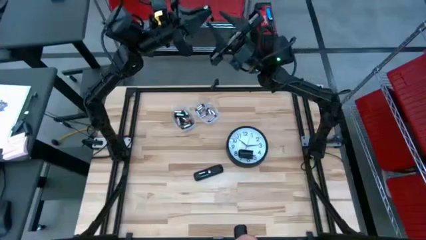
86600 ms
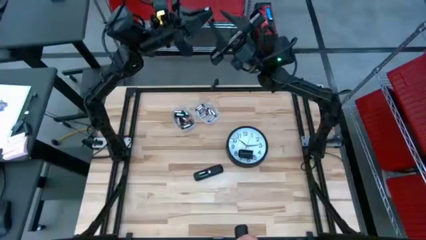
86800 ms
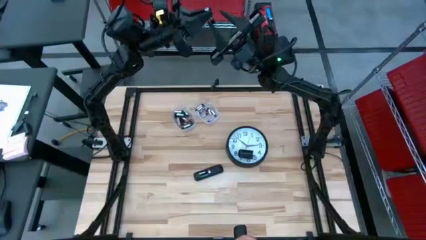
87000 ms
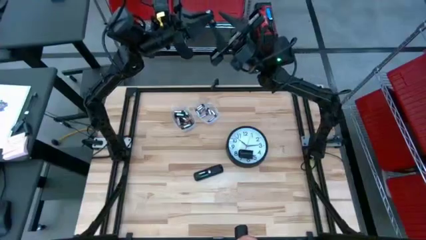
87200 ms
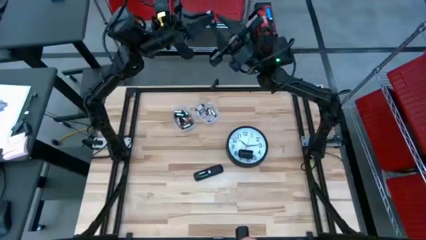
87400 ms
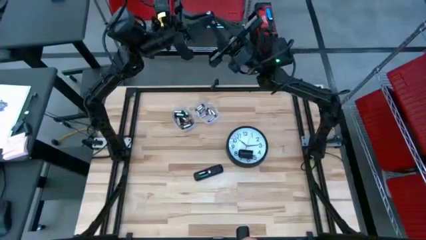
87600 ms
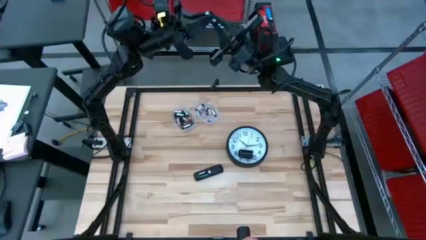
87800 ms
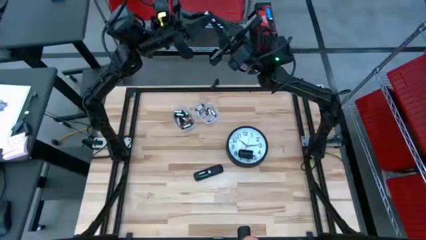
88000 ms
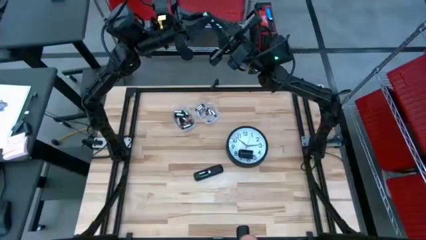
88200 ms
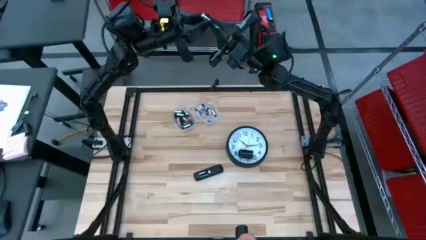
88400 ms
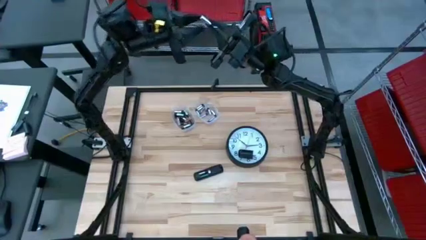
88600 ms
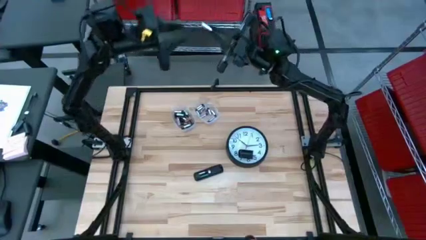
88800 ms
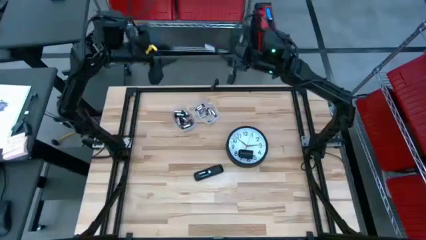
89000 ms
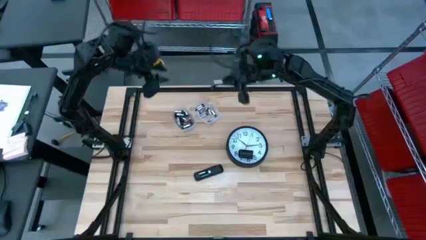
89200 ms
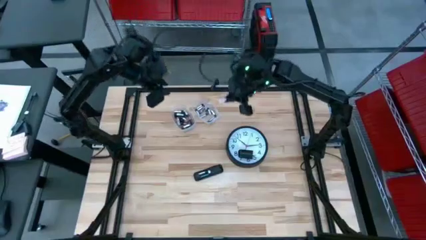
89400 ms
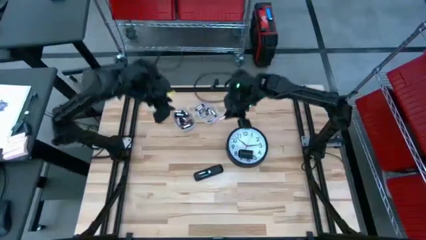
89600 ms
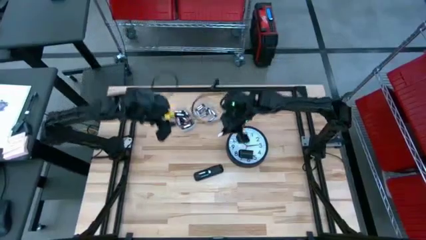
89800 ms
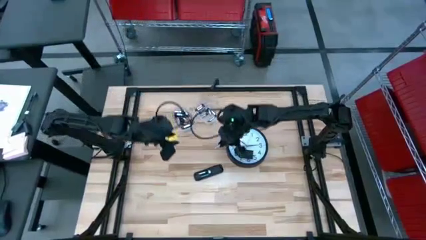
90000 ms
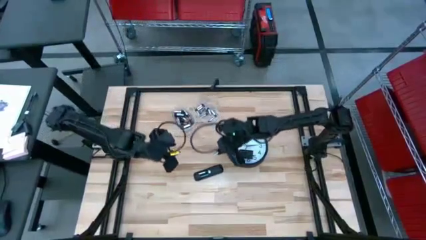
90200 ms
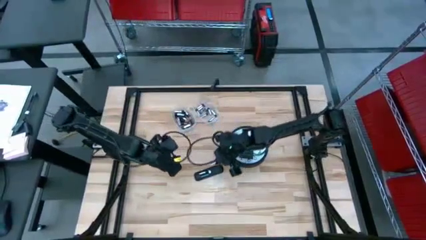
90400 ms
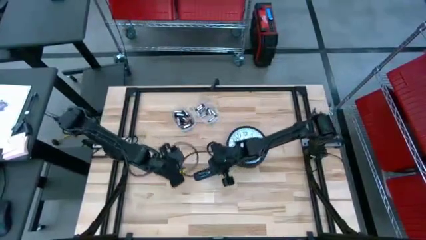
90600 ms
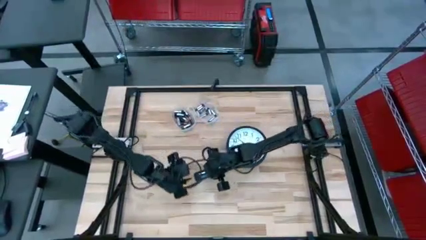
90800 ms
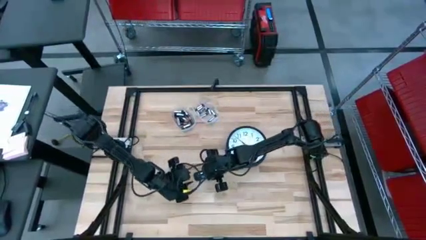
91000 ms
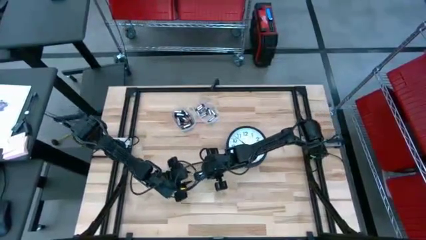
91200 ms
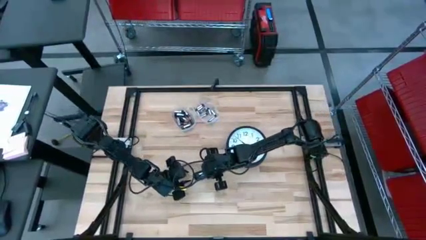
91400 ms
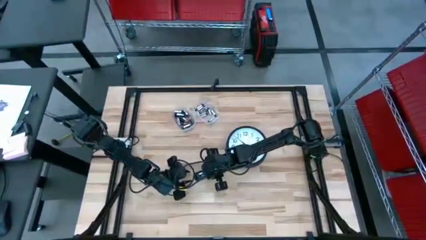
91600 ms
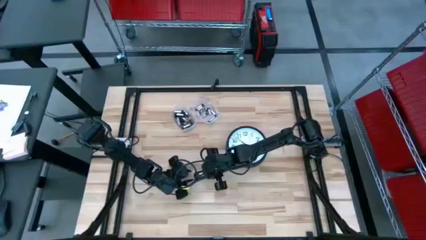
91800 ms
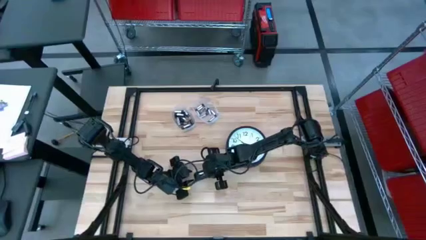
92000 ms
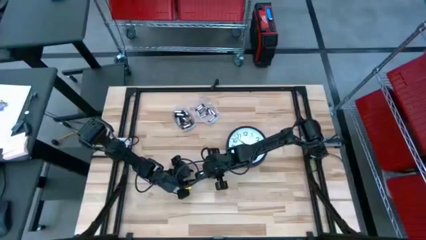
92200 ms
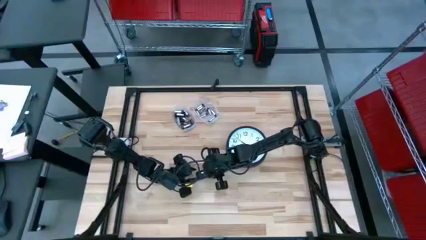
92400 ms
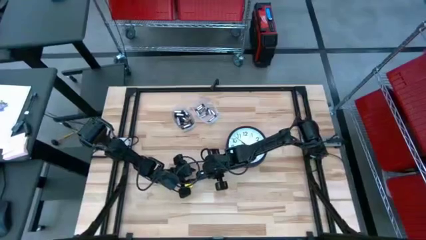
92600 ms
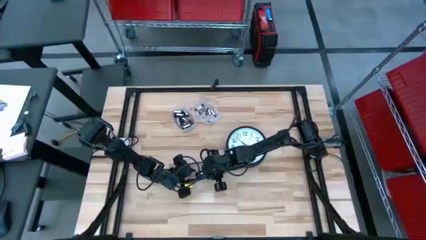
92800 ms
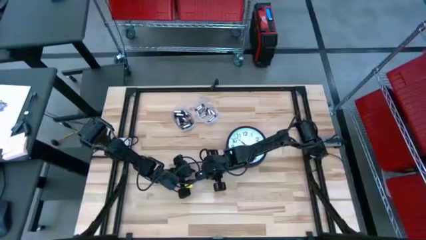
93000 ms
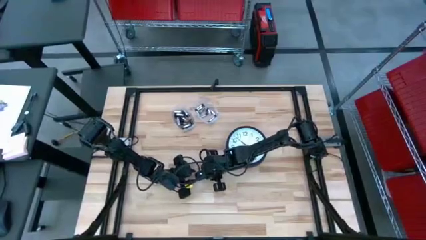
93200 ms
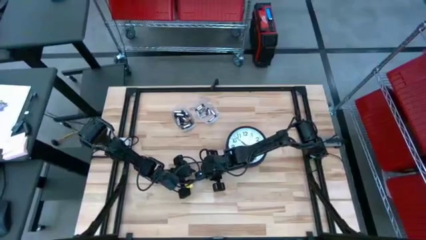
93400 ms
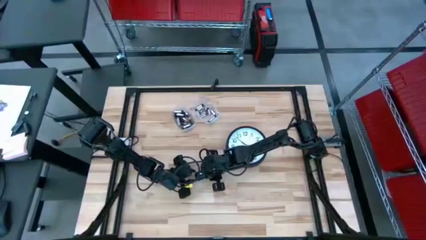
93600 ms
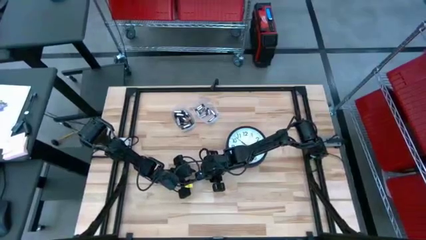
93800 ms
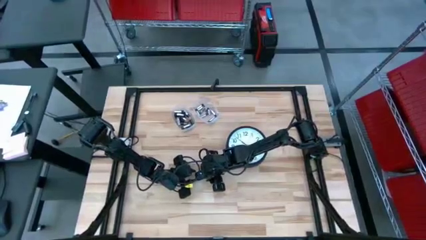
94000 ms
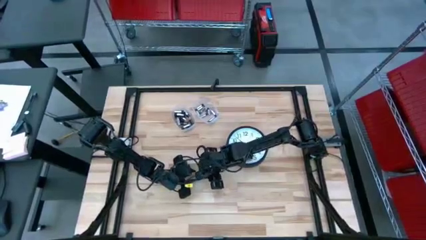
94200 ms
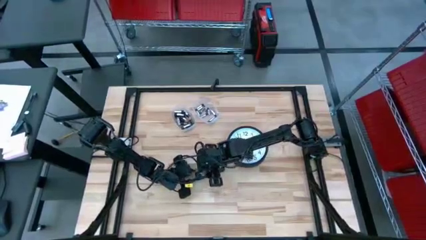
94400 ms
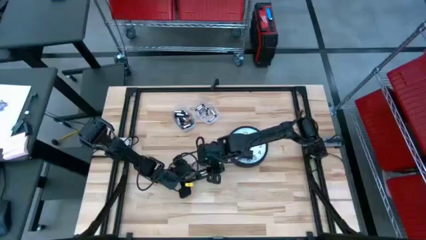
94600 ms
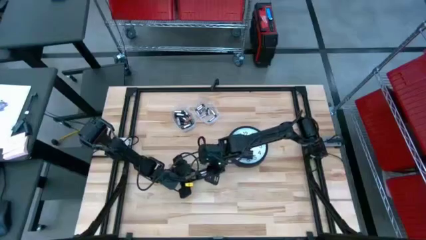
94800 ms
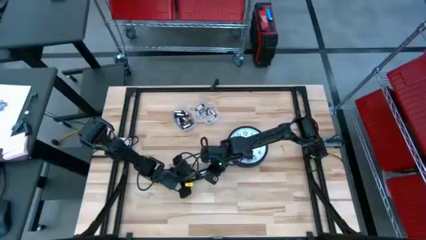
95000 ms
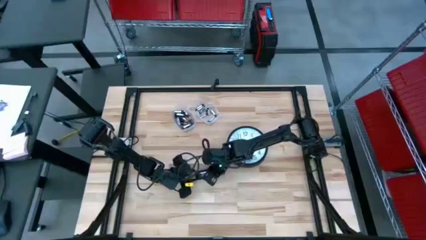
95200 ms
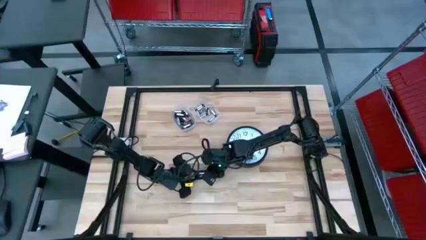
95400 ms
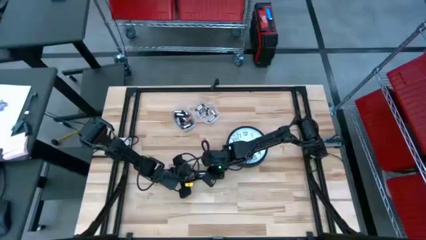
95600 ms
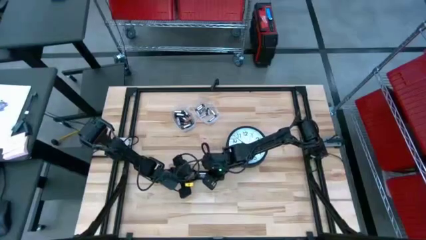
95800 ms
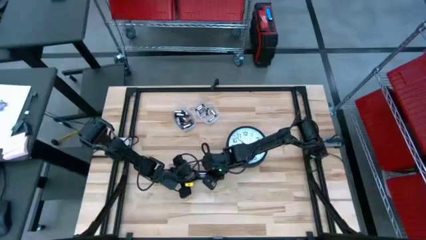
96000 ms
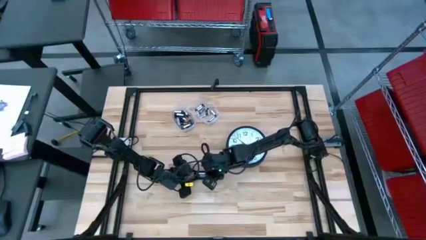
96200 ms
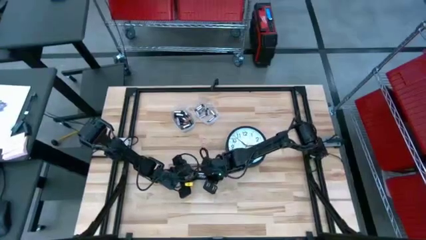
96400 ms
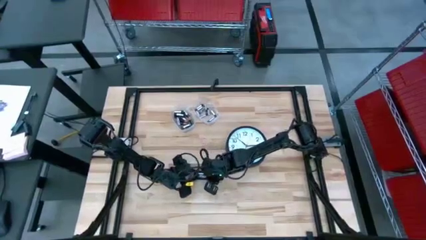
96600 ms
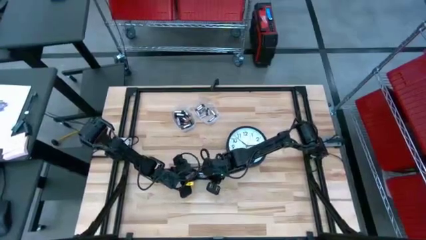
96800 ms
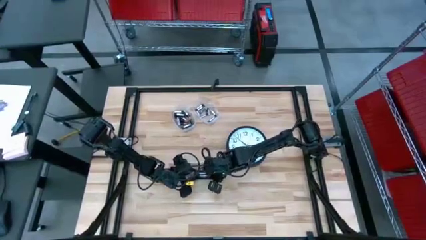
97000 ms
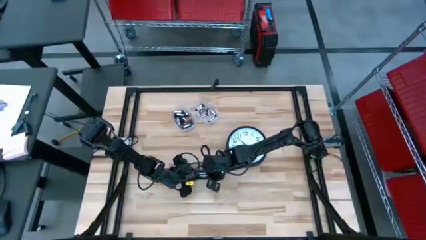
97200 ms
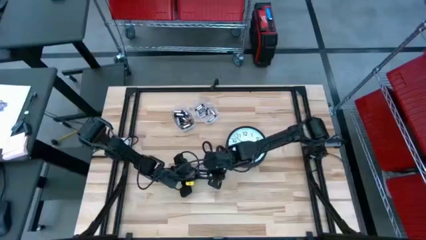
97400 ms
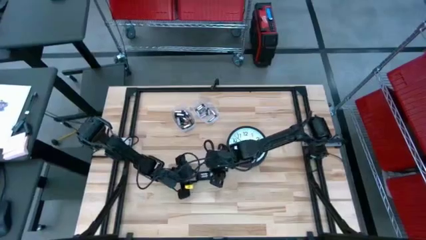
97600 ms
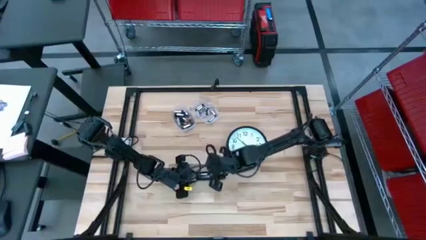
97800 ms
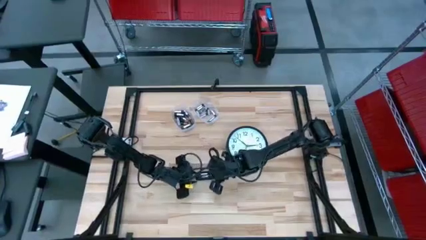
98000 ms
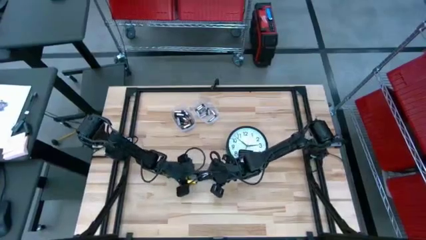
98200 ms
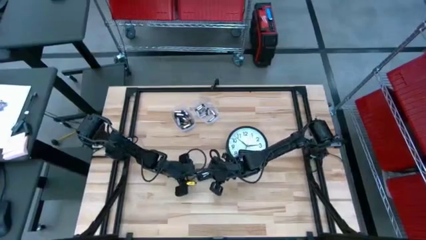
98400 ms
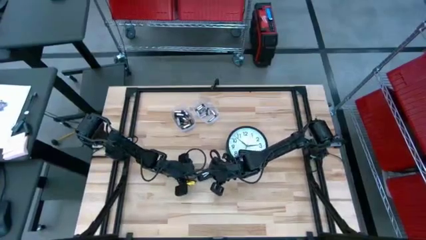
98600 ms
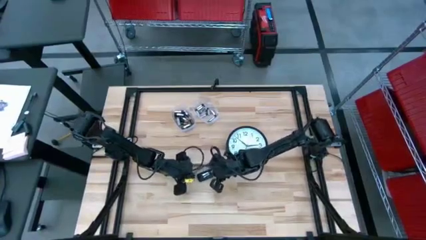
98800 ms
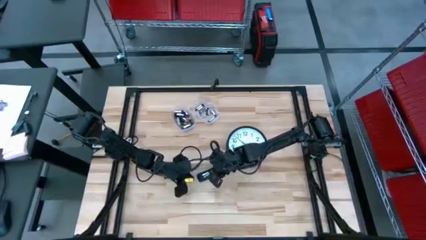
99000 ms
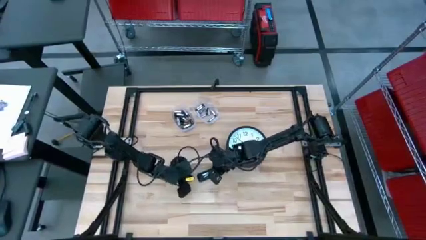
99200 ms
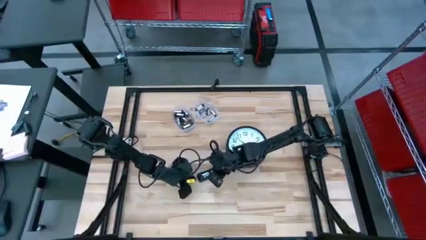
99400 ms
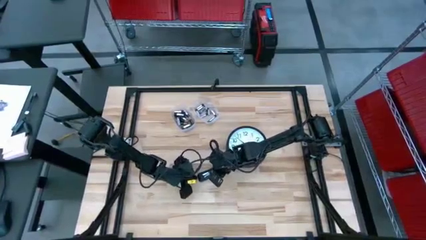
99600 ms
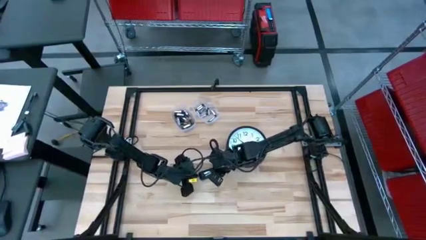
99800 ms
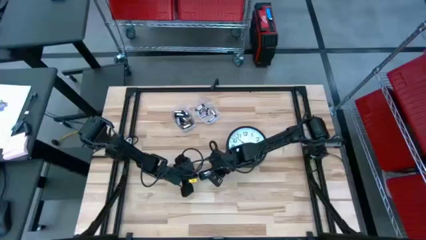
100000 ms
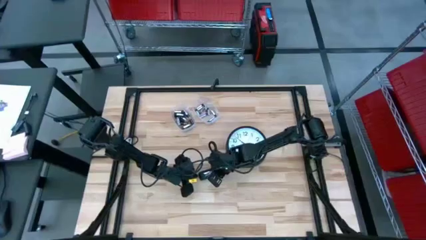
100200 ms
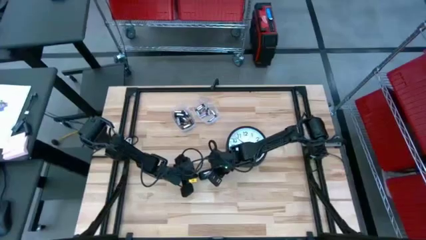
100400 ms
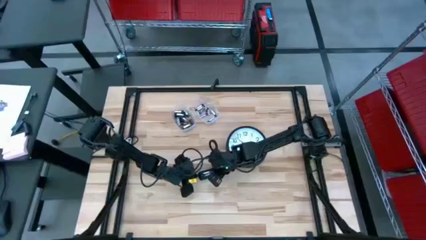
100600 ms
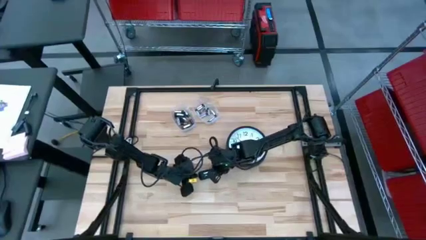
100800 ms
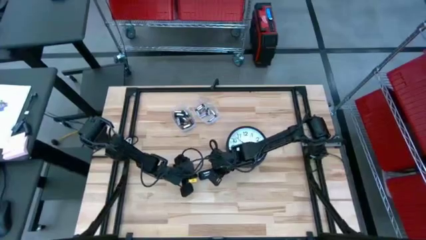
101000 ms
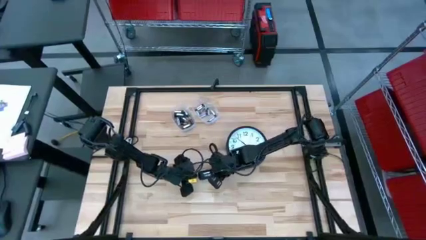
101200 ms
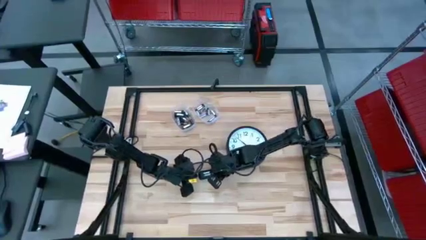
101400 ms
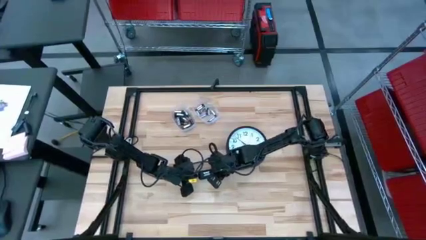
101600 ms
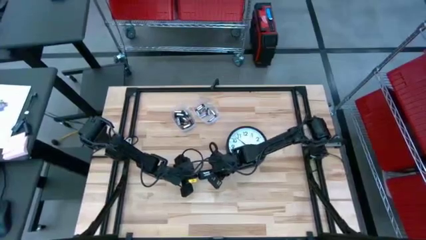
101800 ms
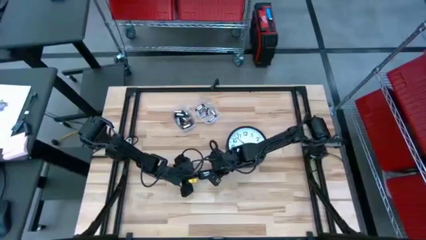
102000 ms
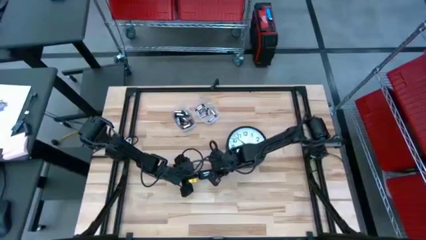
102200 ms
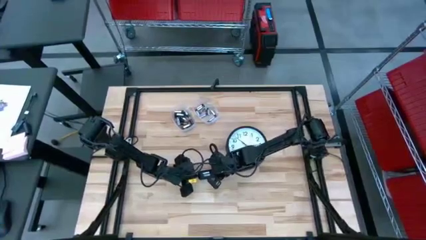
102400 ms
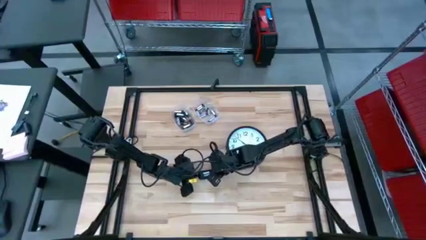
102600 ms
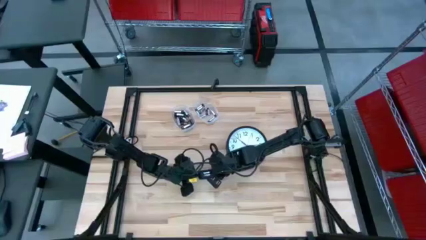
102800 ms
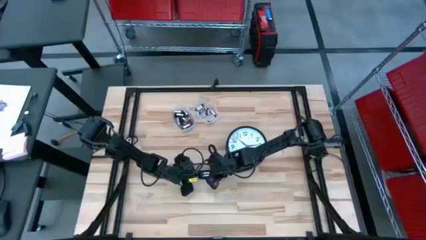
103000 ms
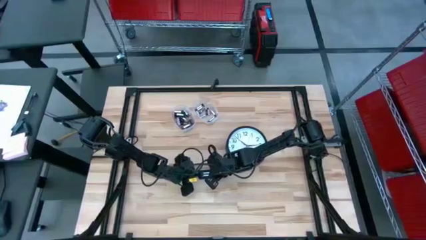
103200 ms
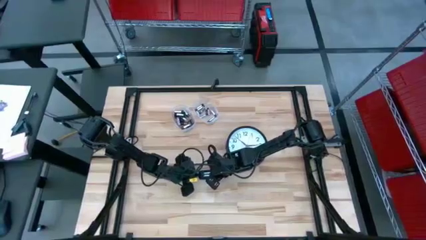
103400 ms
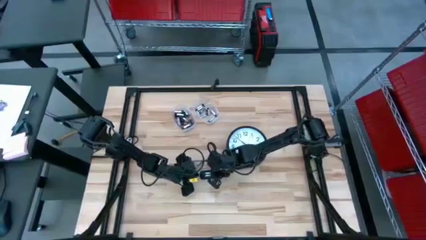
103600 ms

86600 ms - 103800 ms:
Task: Insert battery
Insert the silver battery into the remote control
